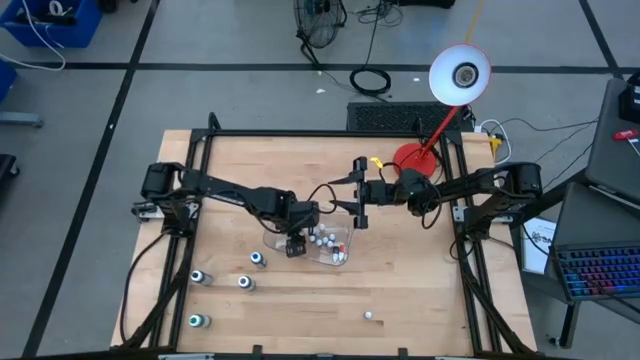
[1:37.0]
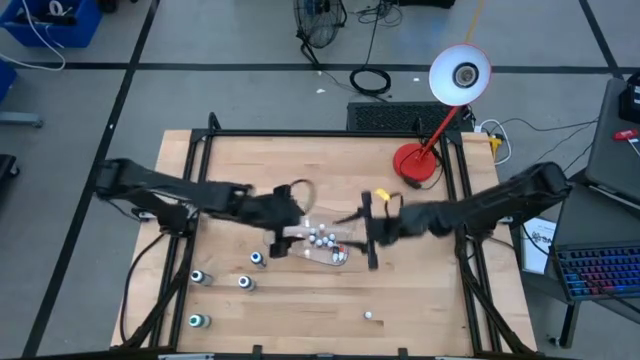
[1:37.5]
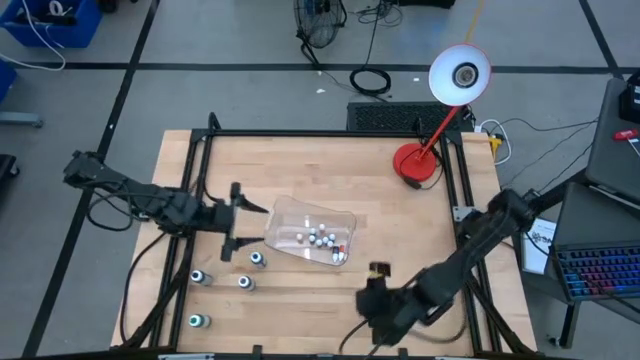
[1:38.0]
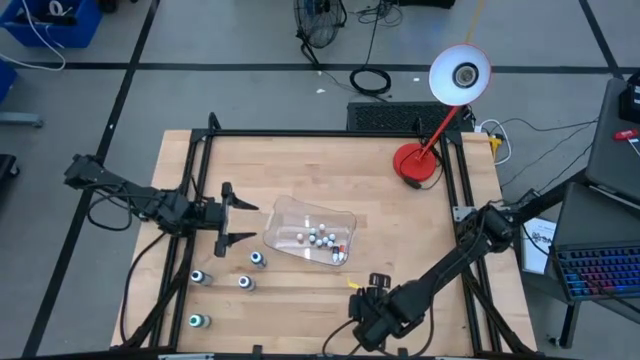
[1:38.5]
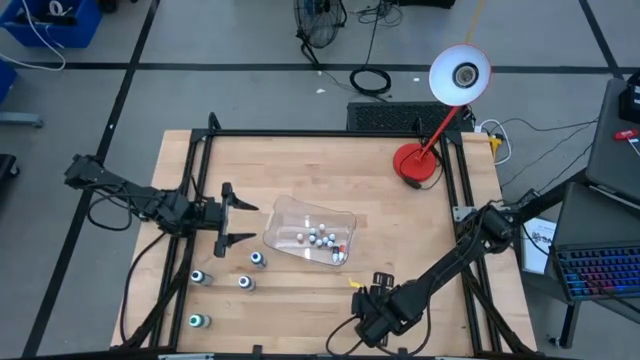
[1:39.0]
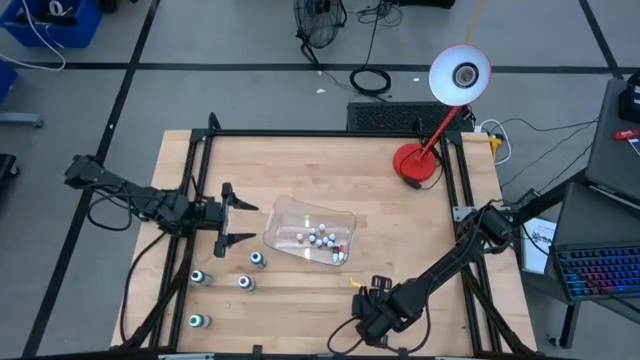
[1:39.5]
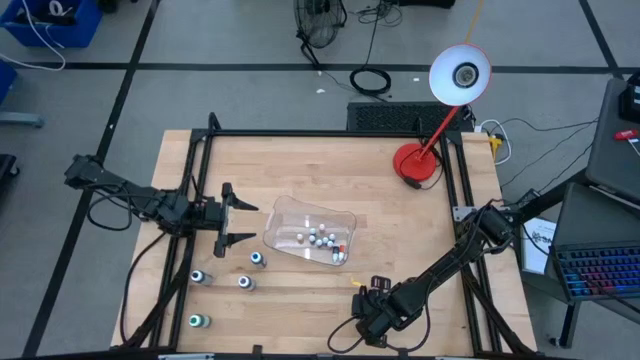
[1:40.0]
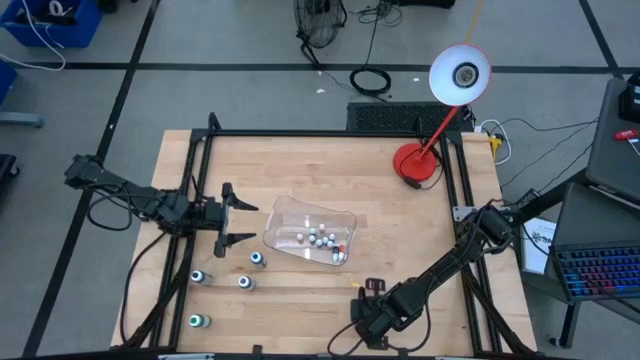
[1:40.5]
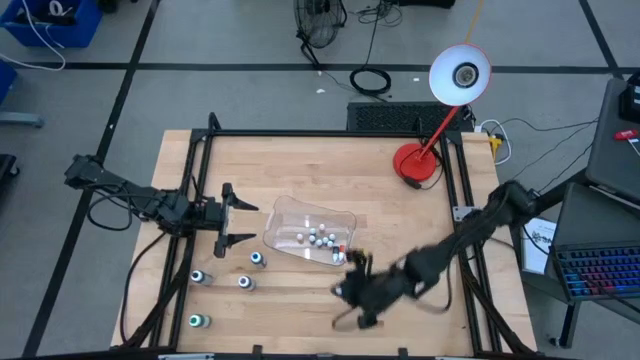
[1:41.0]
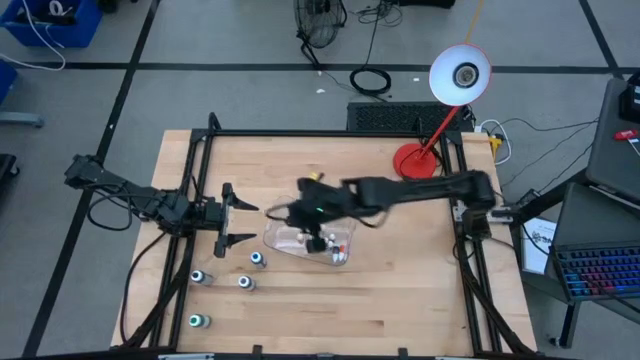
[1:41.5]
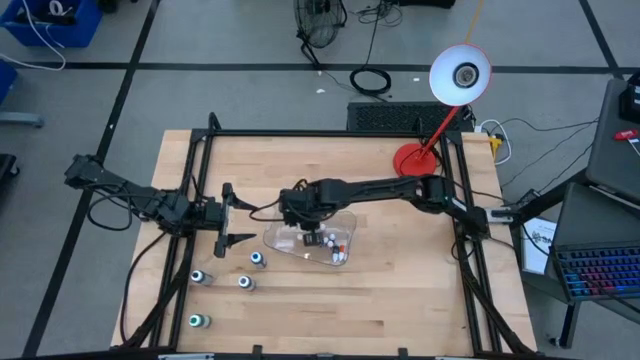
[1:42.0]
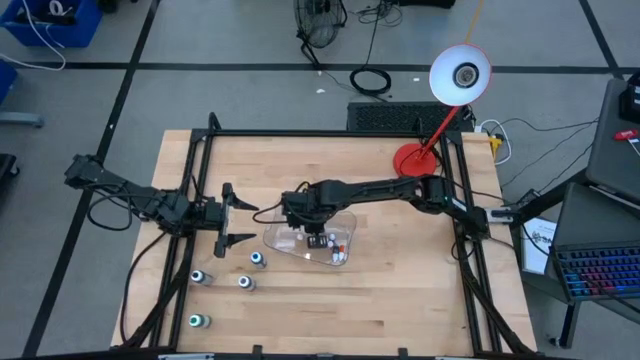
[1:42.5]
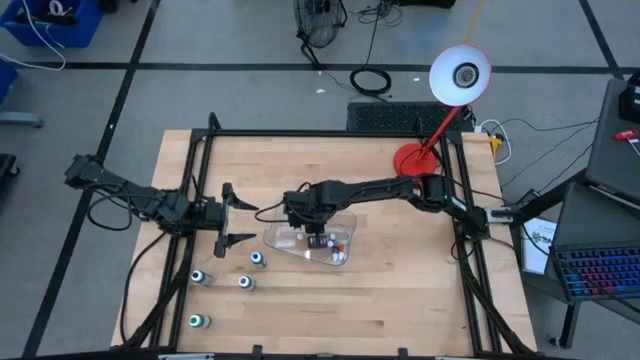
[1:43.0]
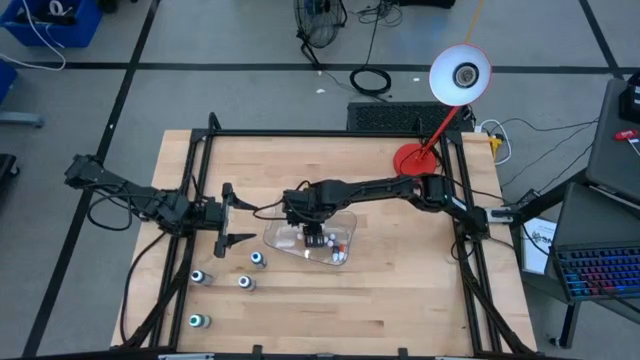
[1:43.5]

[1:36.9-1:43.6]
Task: Pick & Place food coloring
Put the small blue food coloring bottle into the transparent bin

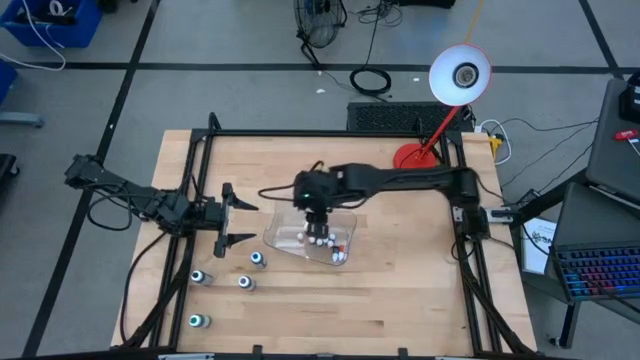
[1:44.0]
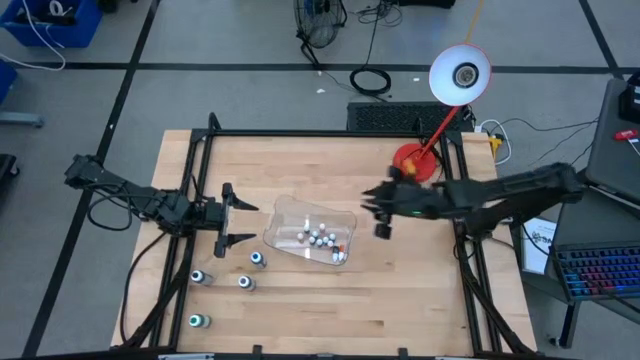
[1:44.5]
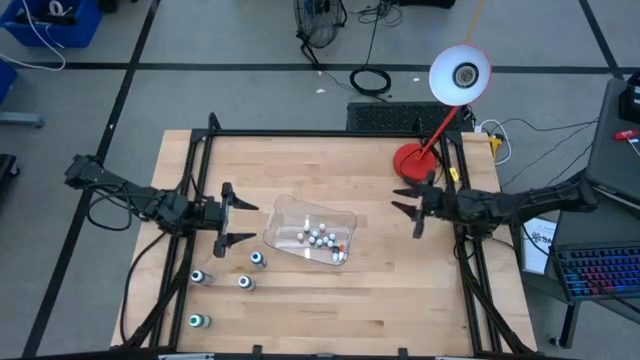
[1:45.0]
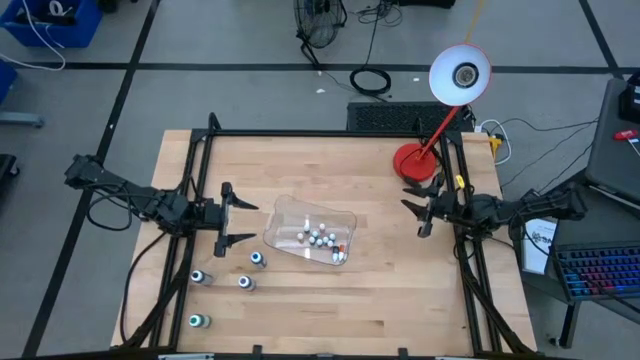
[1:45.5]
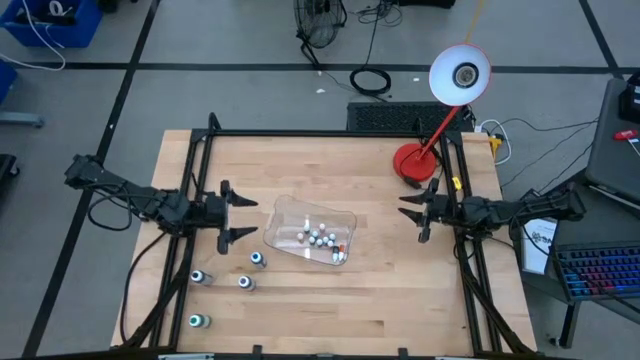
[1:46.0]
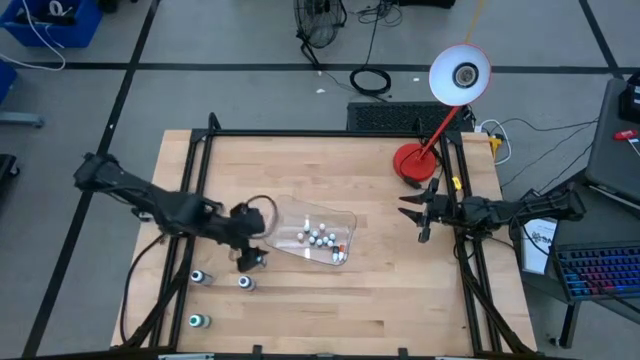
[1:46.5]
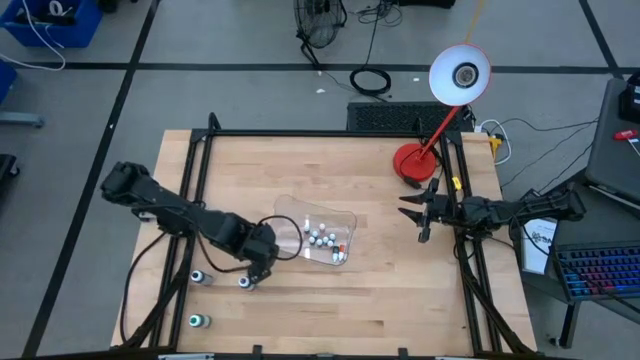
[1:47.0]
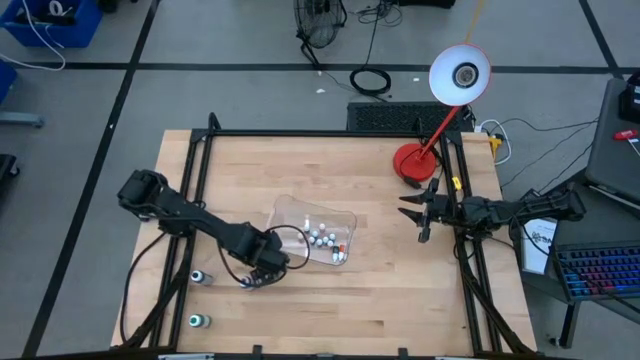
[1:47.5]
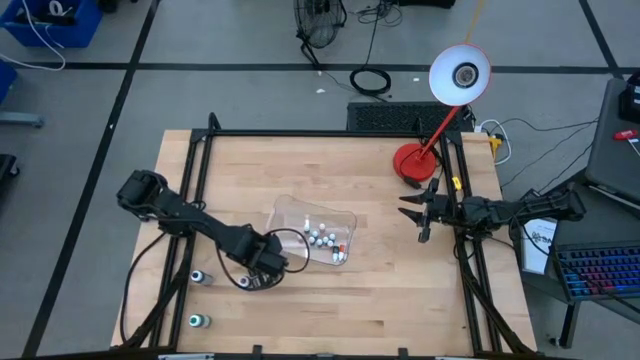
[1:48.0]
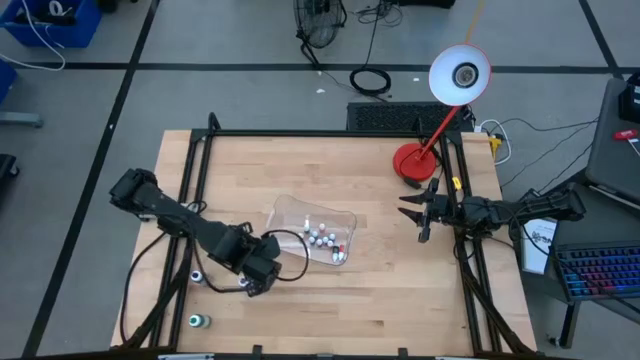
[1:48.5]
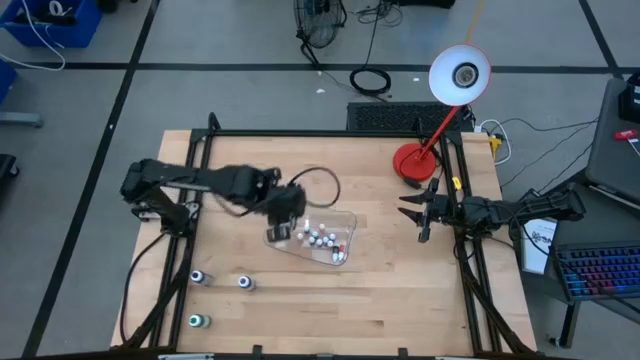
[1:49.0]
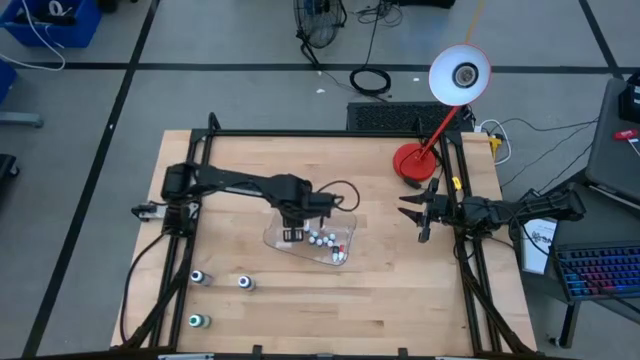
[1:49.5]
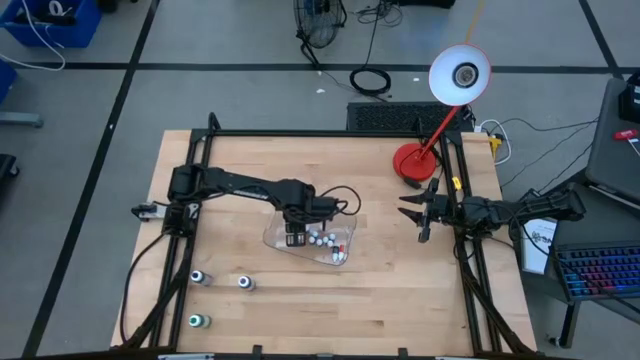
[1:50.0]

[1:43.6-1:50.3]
Put the large blue food coloring bottle into the transparent bin

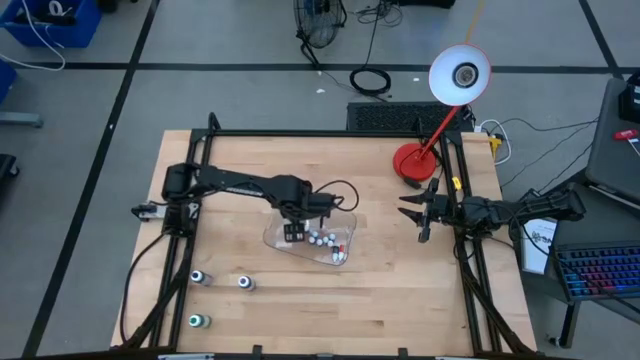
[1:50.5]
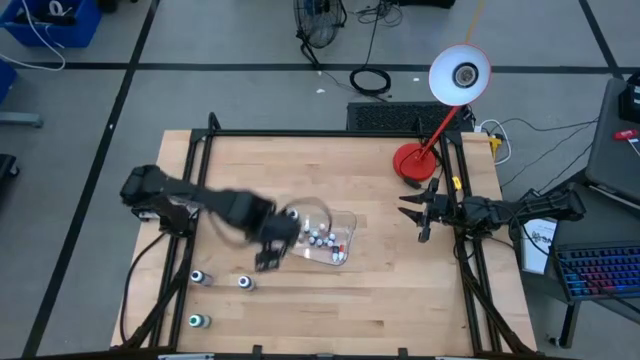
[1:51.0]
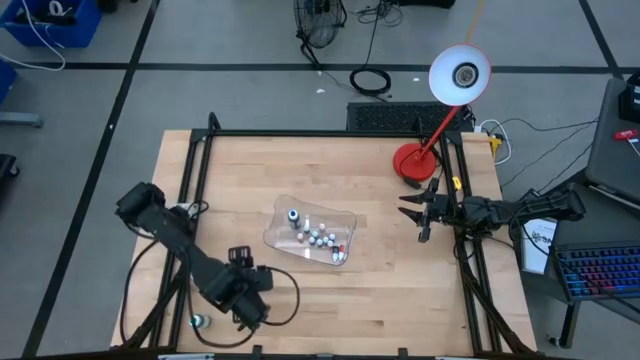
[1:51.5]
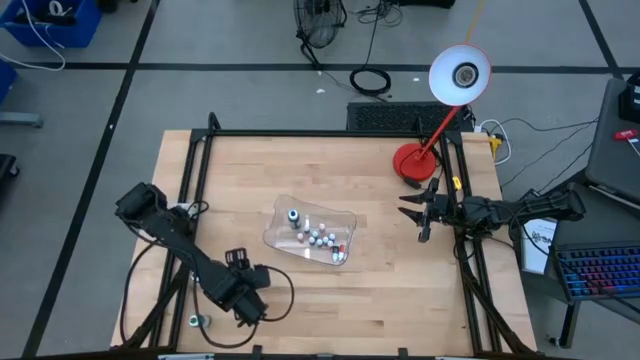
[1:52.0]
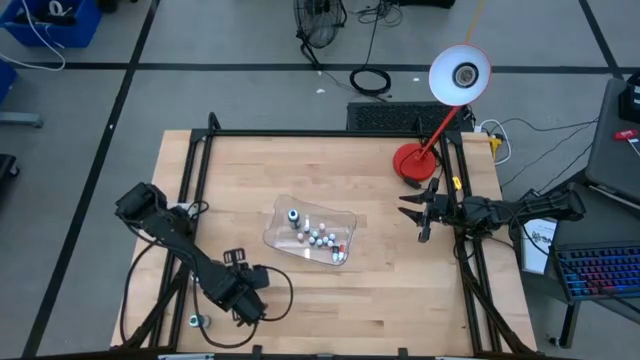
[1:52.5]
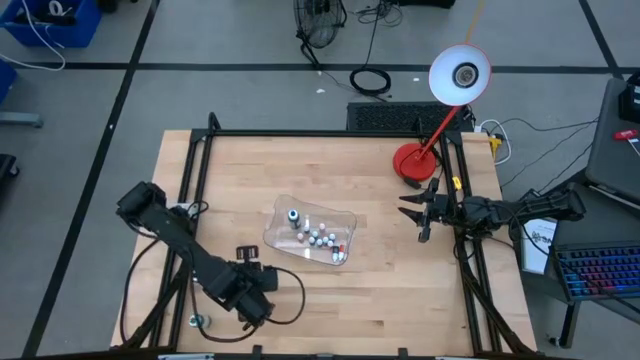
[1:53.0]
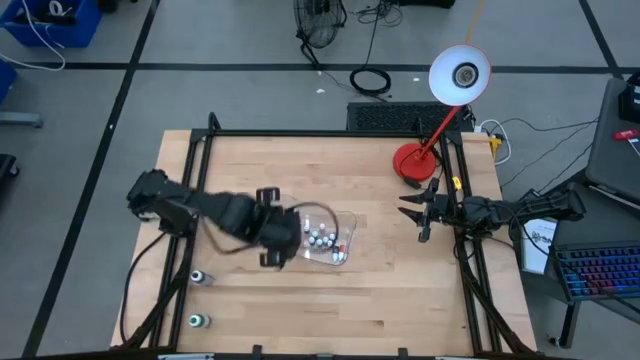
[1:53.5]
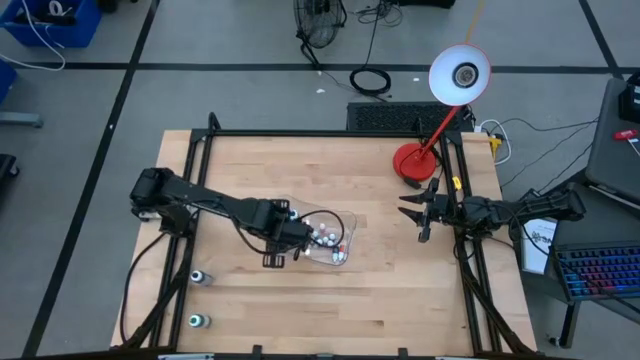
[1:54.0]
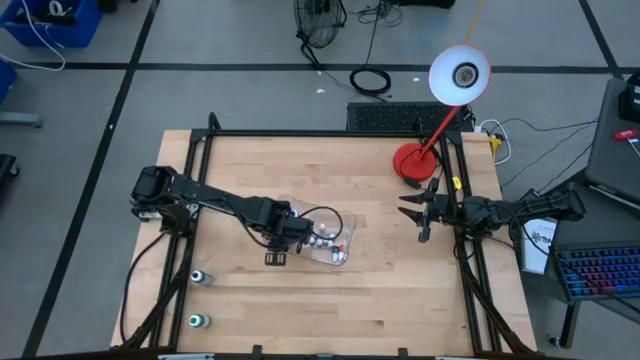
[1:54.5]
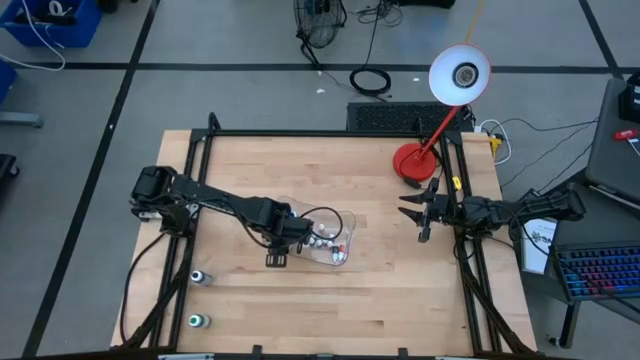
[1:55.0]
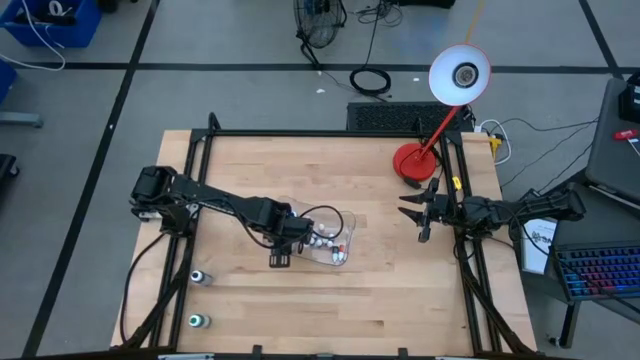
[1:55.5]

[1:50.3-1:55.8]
Put the large violet food coloring bottle into the transparent bin
